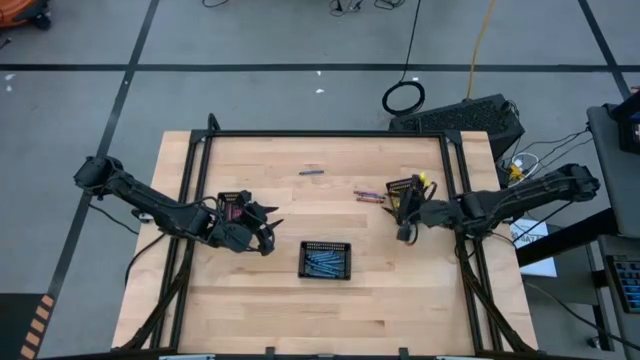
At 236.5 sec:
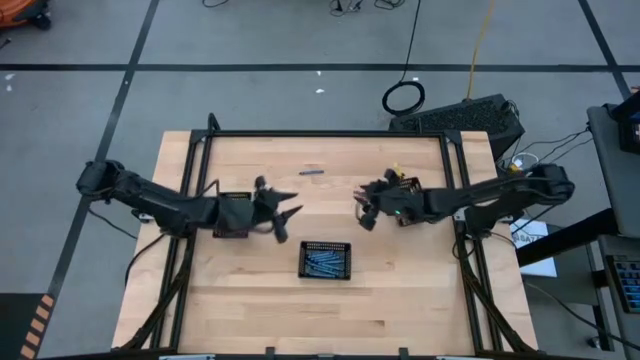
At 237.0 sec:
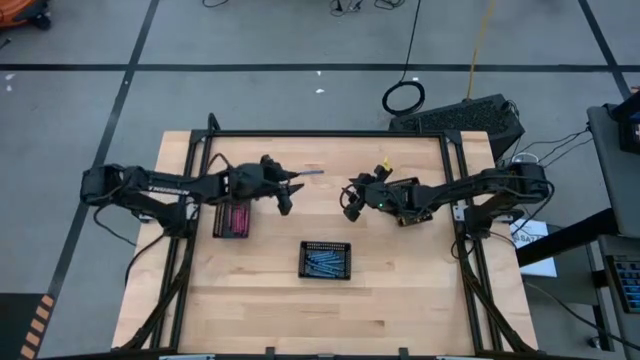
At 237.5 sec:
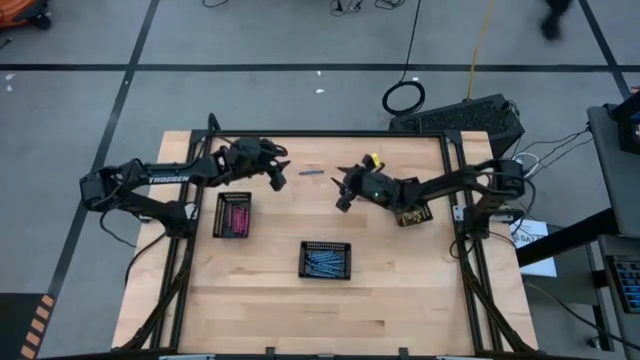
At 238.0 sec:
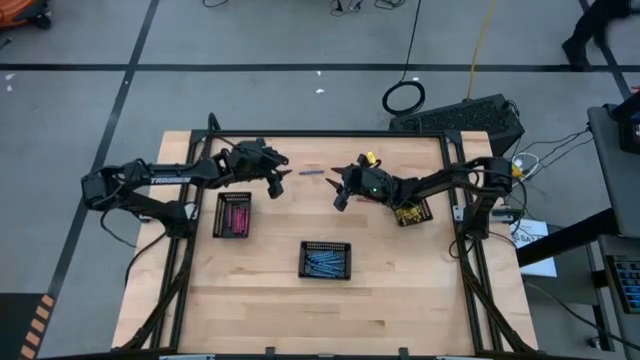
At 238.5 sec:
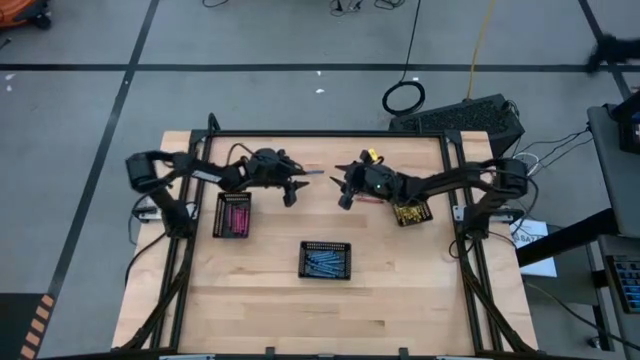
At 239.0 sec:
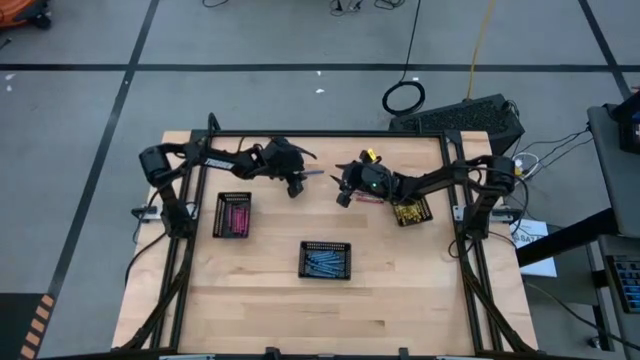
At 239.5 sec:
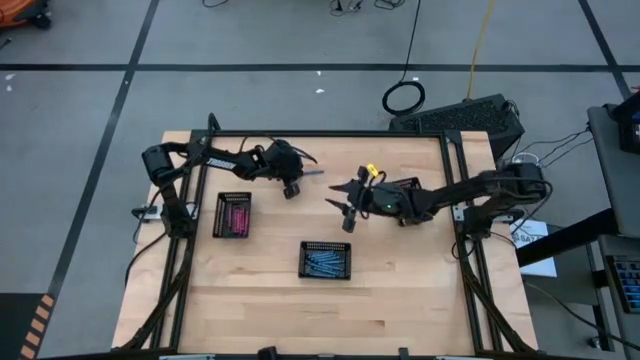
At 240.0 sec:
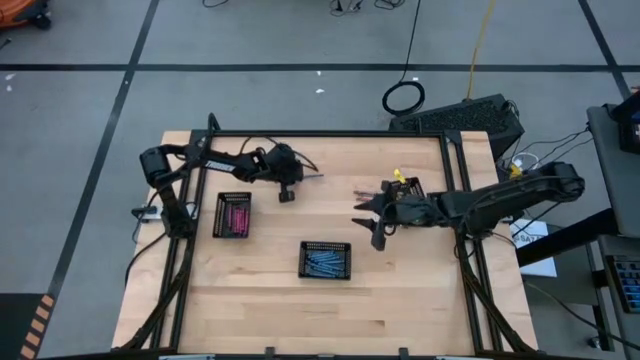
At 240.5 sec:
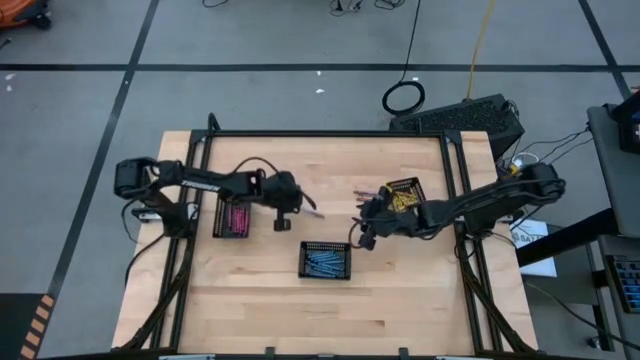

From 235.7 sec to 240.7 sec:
Task: Sort crayons
Put the blue crayon into the center black basket

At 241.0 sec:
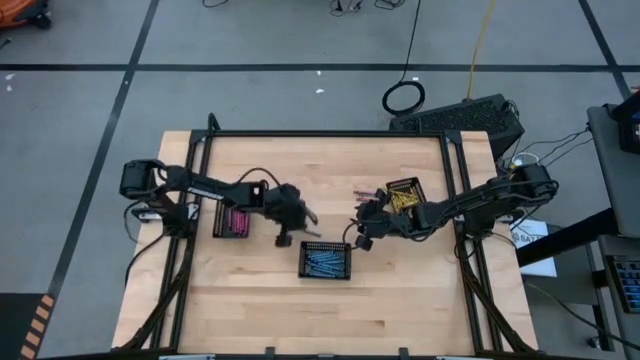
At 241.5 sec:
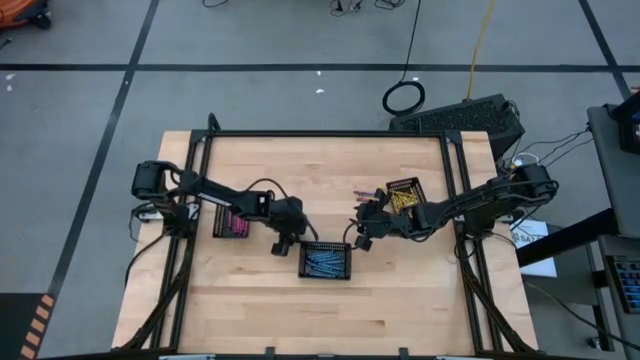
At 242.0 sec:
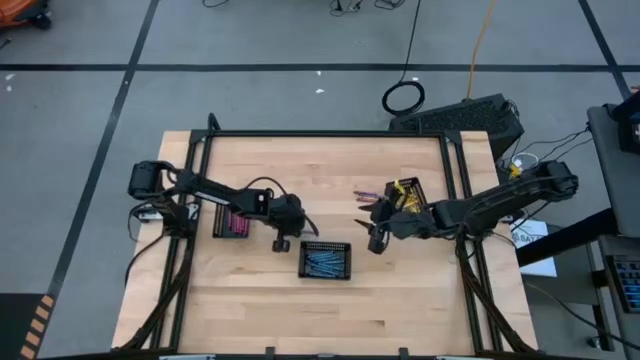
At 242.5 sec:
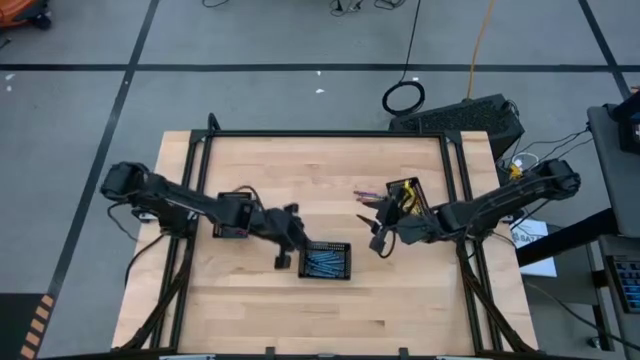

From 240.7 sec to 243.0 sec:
Put the blue crayon into the center black basket

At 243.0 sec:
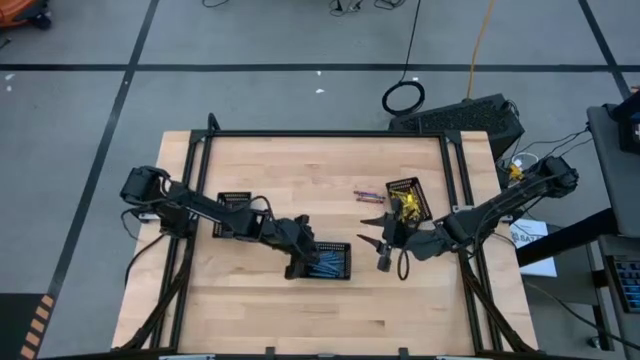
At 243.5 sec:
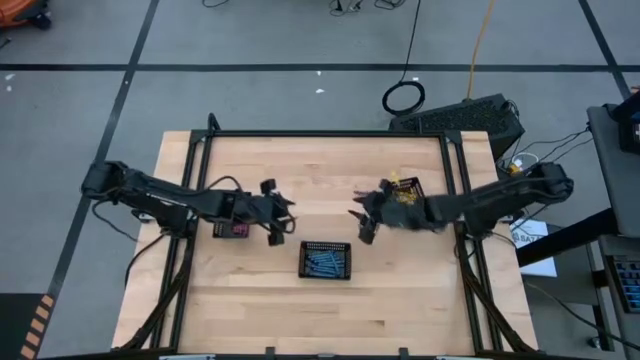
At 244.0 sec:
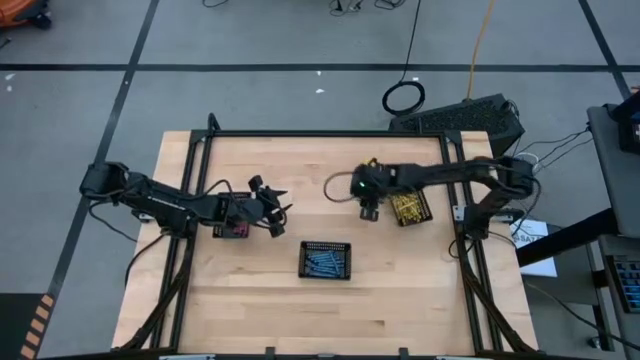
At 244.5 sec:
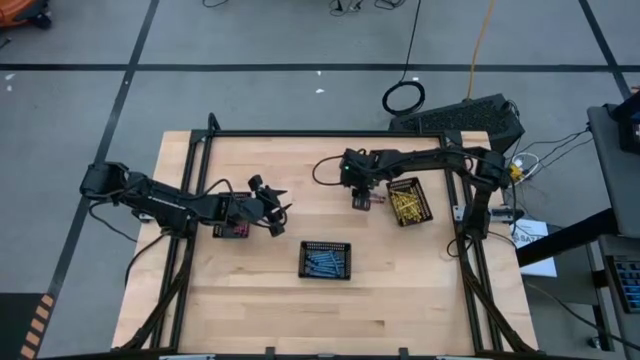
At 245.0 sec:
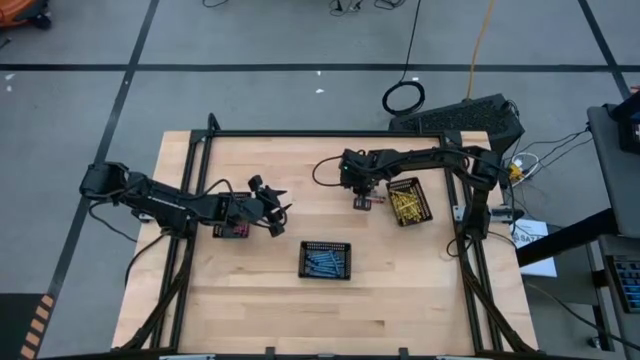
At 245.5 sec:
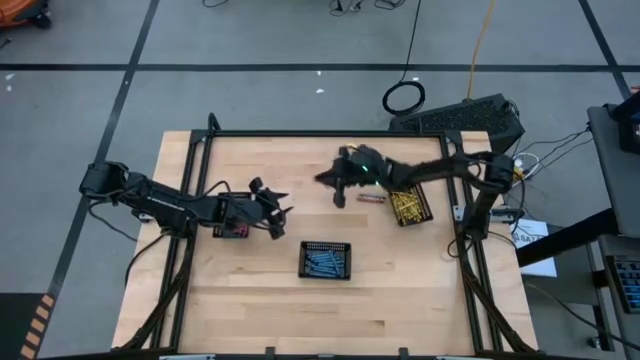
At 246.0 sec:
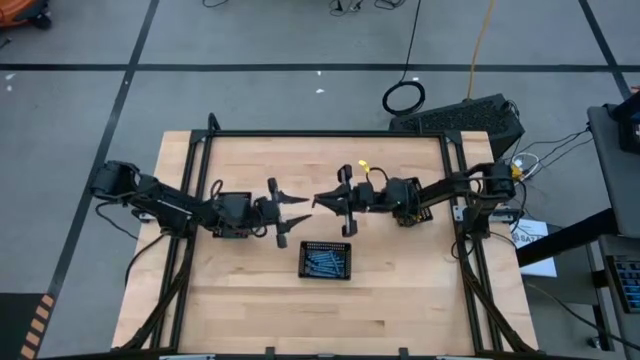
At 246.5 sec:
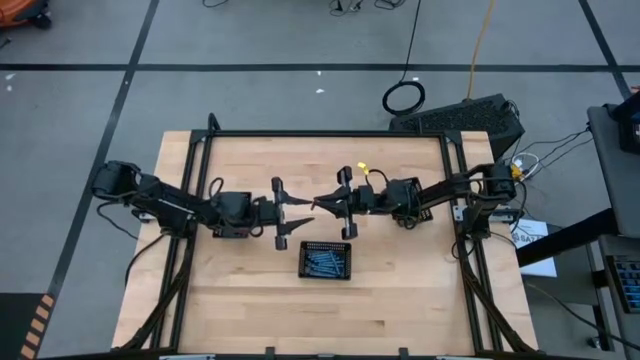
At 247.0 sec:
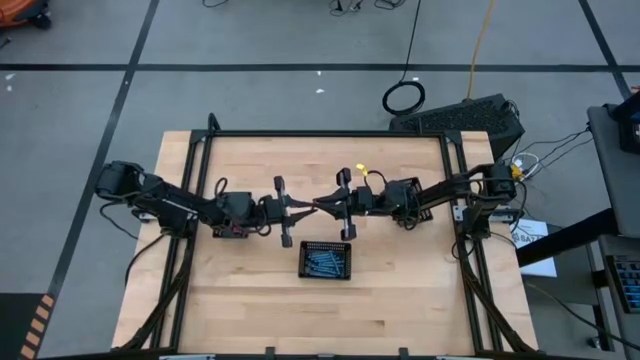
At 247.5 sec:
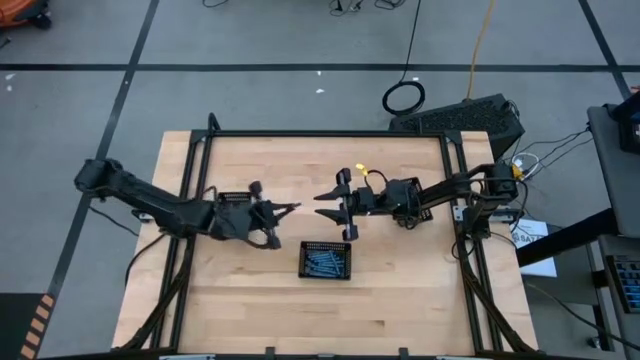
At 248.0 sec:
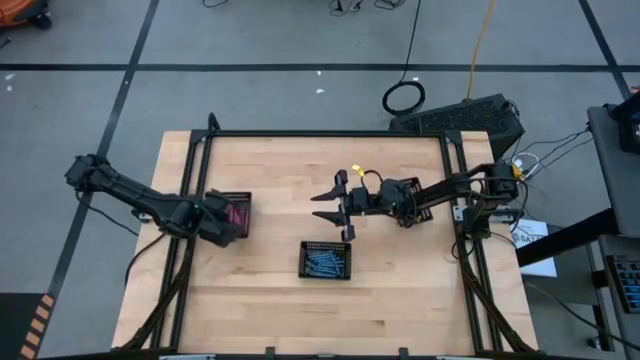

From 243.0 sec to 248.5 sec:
Put the red crayon into the left black basket

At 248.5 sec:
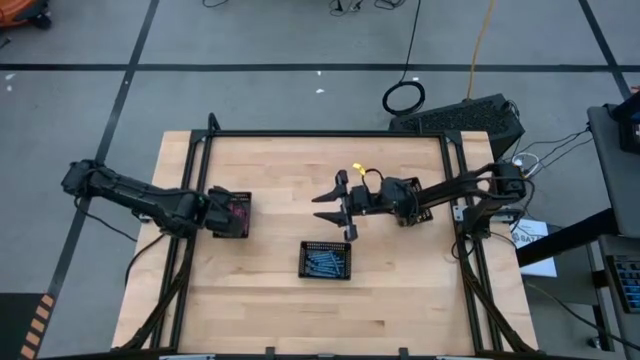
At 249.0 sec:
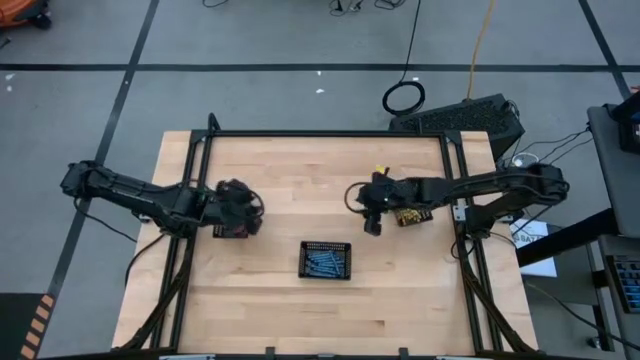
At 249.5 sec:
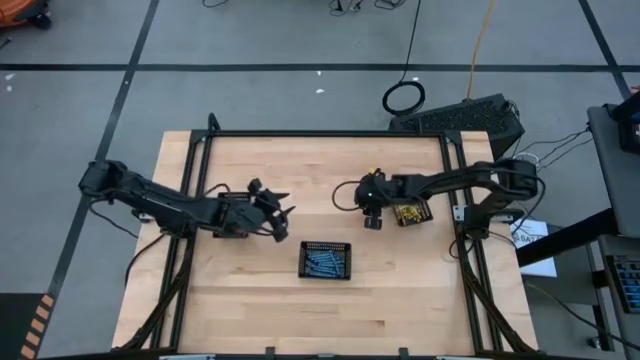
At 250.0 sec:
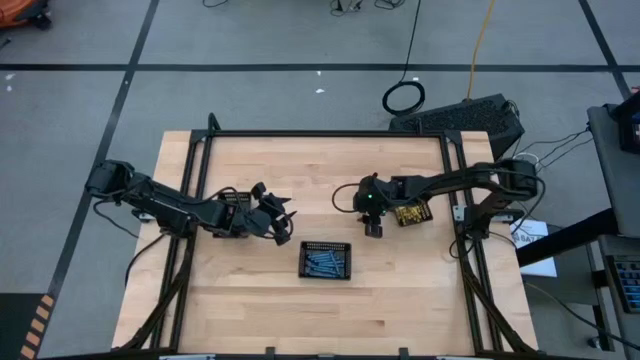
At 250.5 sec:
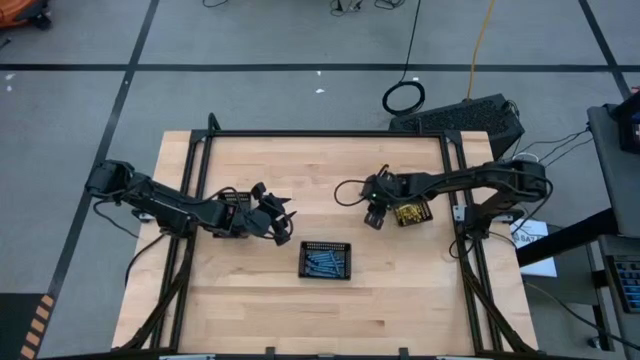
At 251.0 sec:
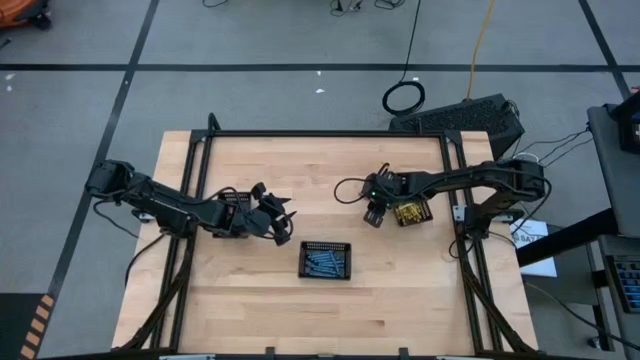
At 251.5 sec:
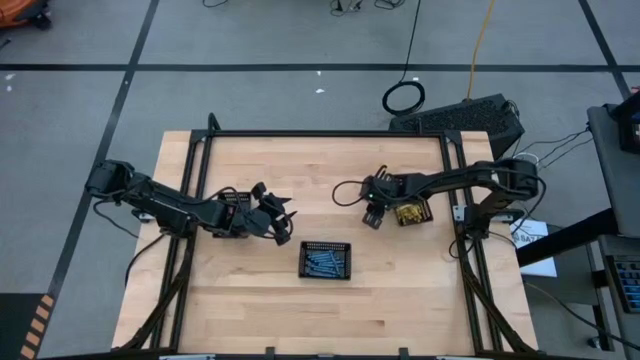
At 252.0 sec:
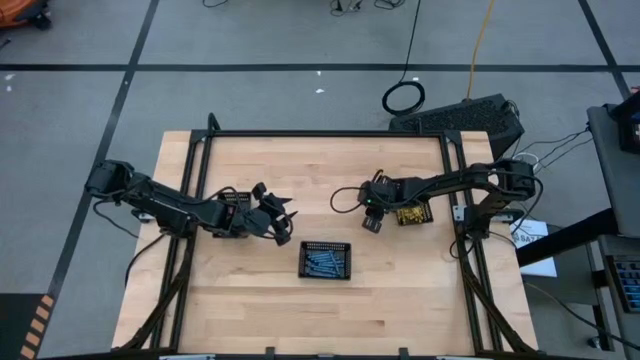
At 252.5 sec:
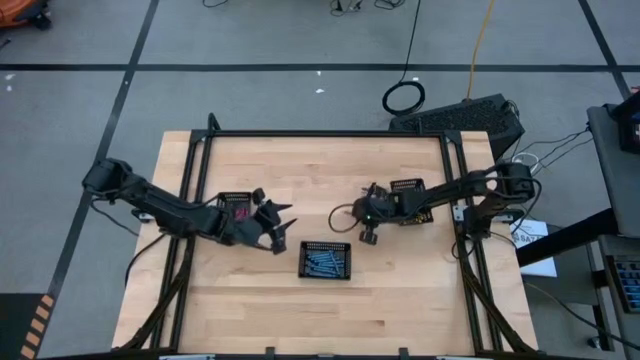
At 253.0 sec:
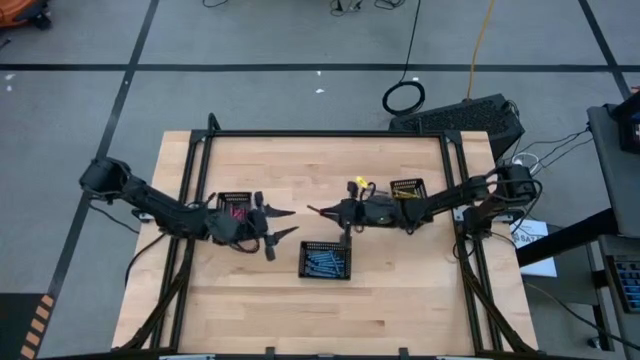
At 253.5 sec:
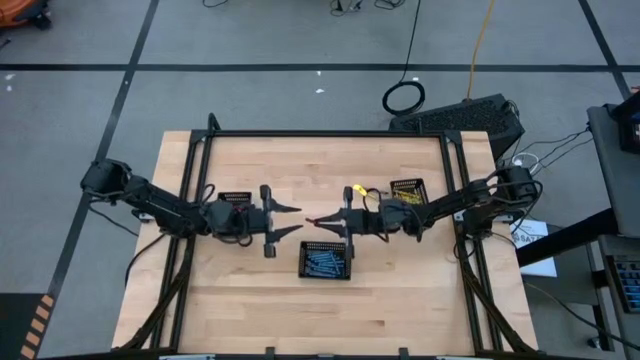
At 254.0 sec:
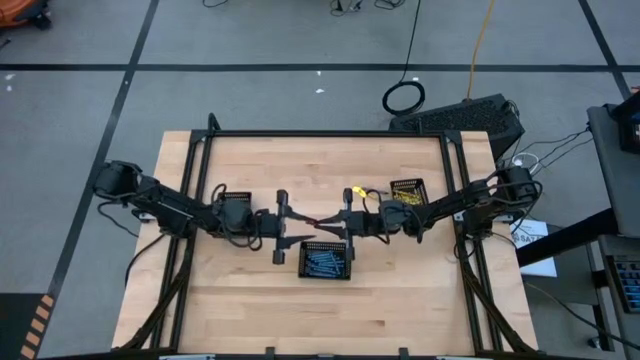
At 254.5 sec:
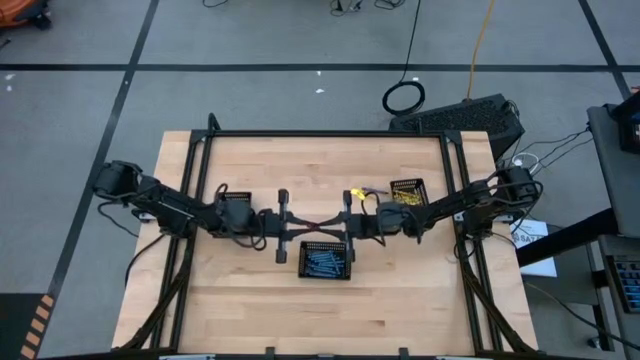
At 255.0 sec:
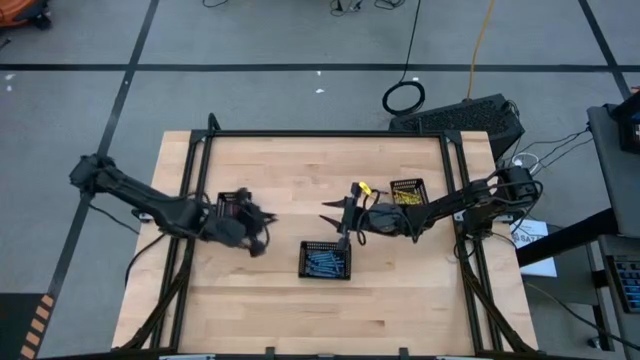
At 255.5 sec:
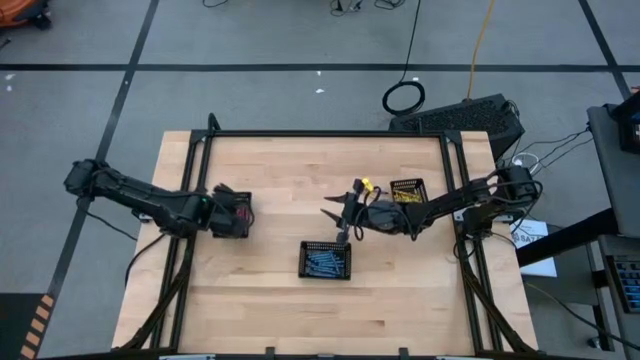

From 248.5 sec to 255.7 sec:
Put the red crayon into the left black basket

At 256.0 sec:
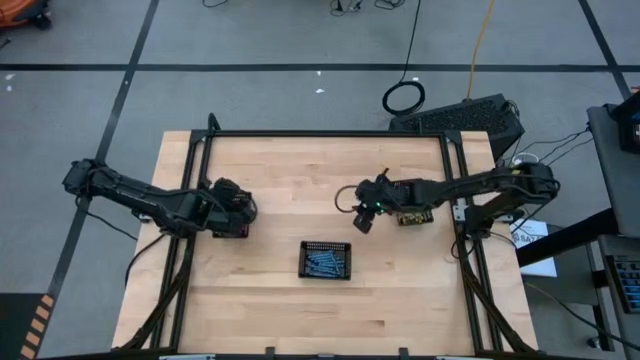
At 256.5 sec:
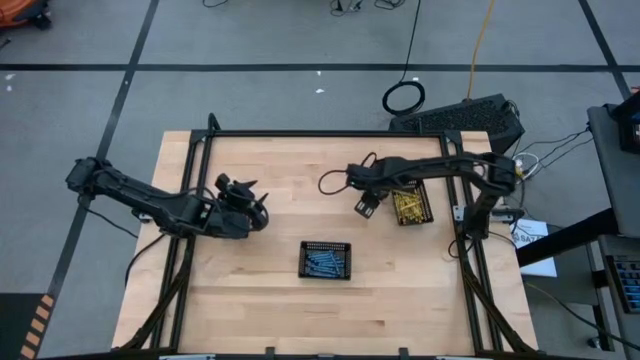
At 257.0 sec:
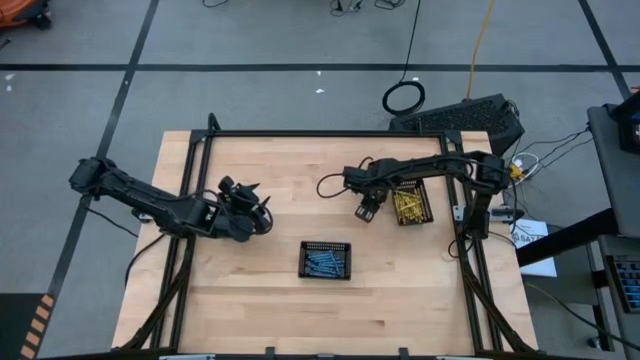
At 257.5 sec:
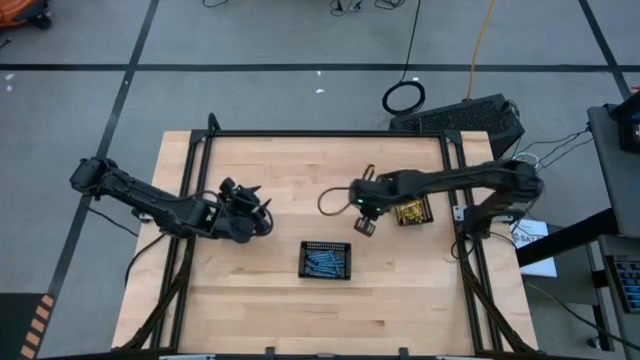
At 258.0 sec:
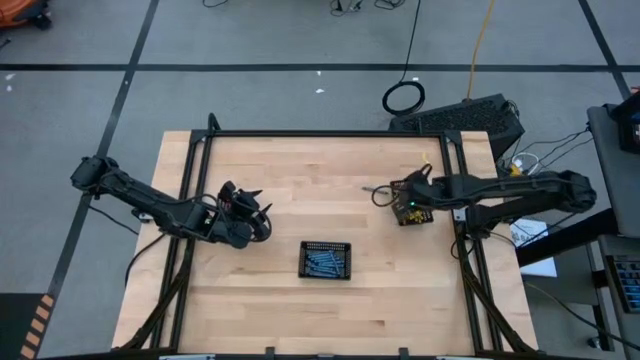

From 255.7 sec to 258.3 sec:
Put the yellow crayon into the right black basket
